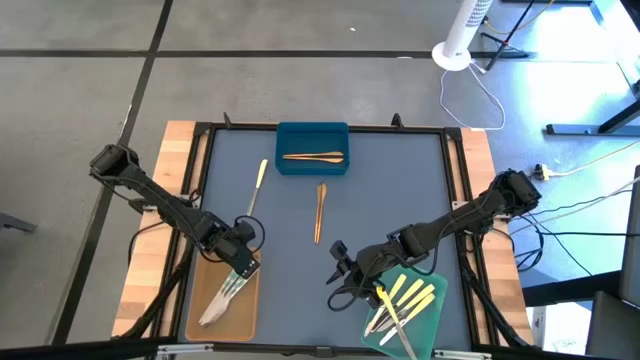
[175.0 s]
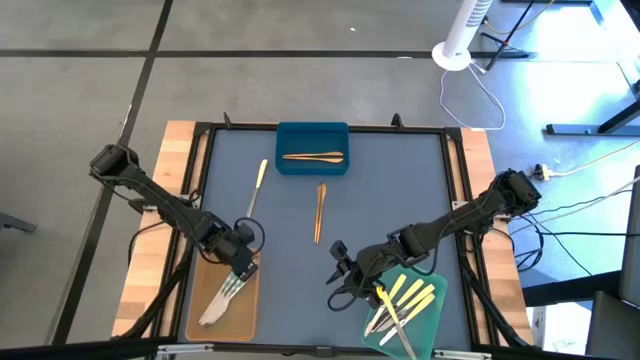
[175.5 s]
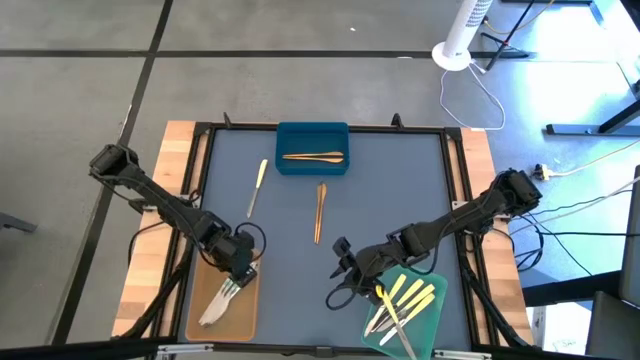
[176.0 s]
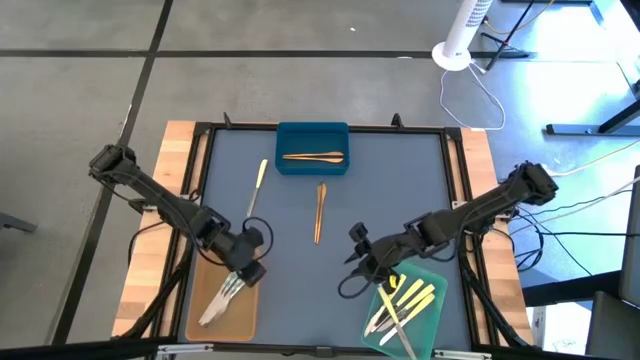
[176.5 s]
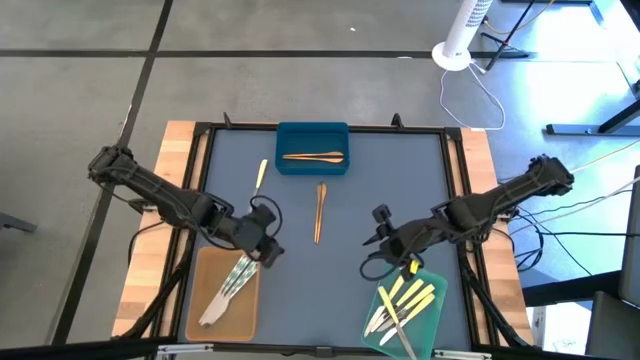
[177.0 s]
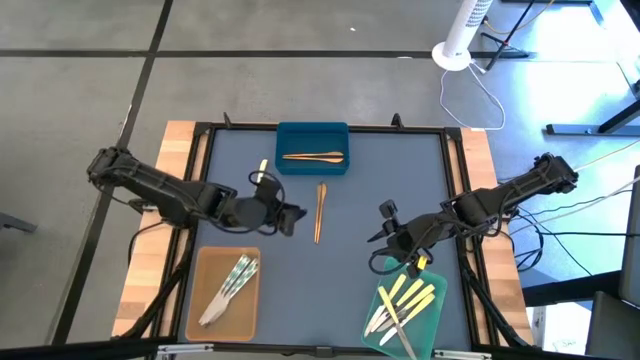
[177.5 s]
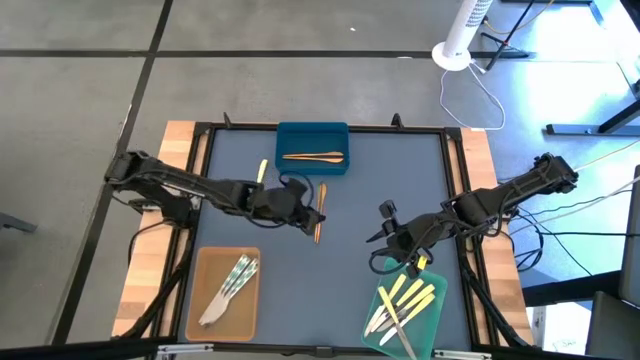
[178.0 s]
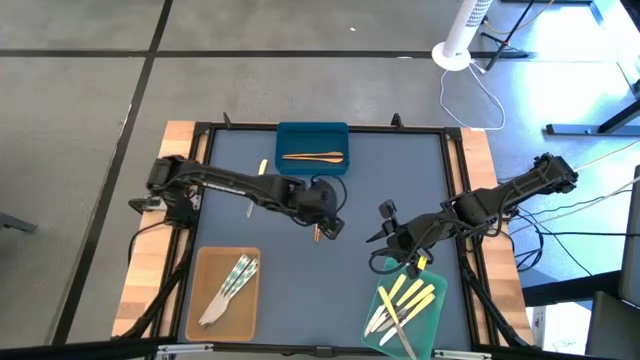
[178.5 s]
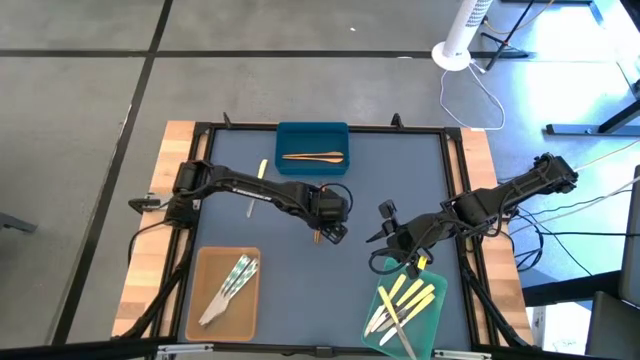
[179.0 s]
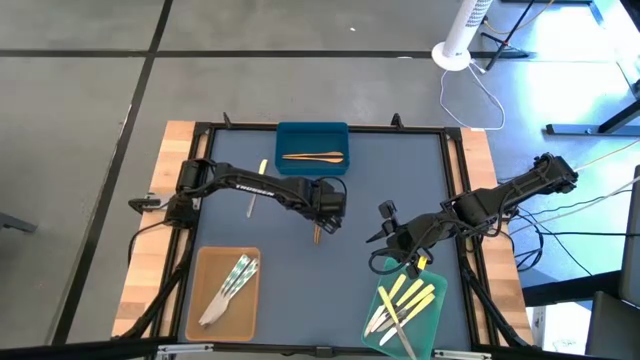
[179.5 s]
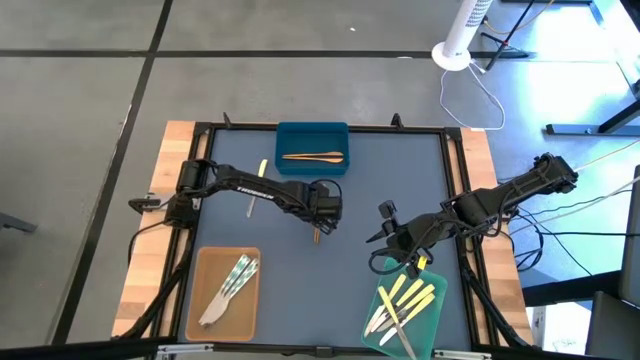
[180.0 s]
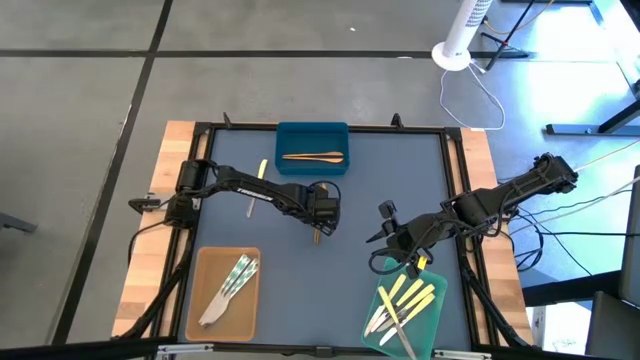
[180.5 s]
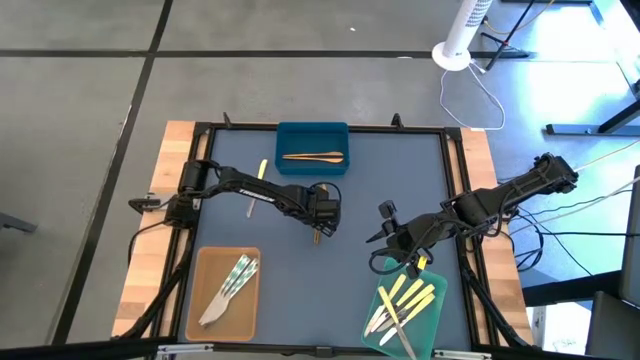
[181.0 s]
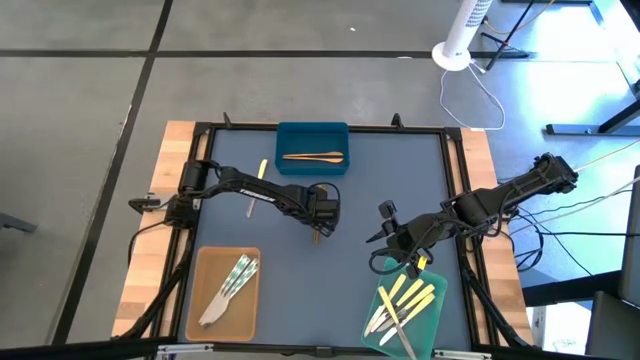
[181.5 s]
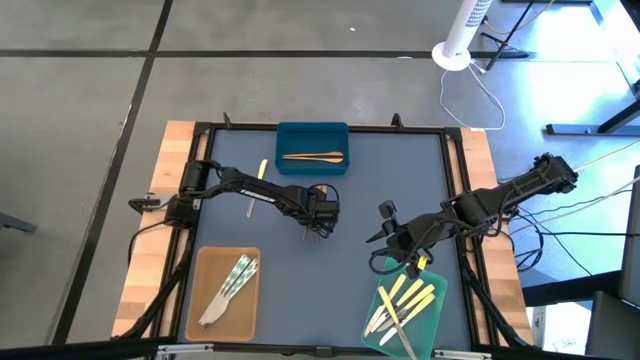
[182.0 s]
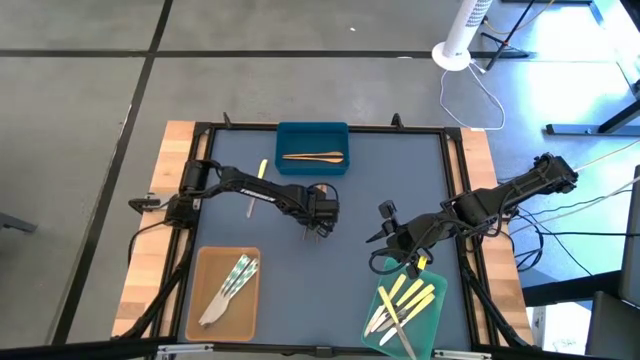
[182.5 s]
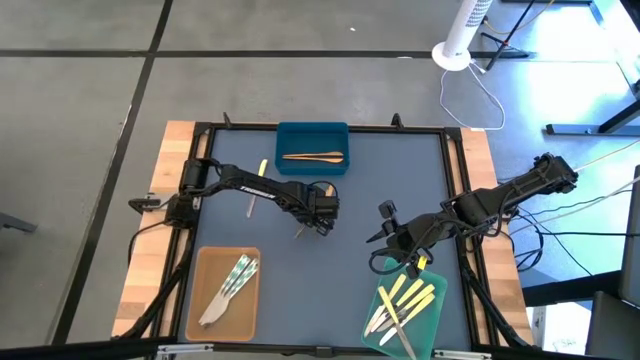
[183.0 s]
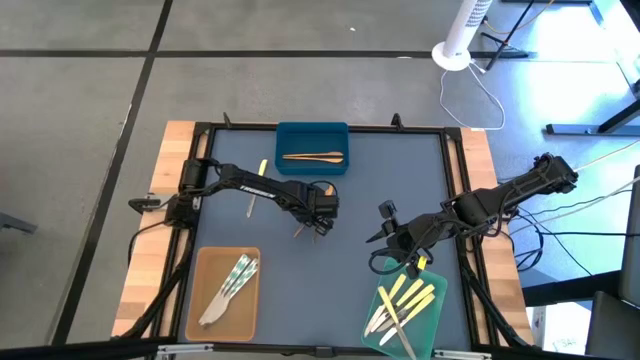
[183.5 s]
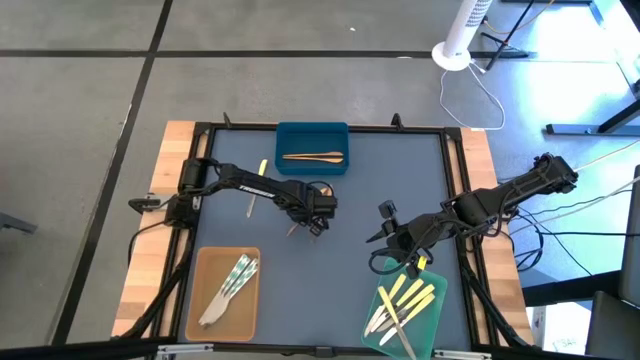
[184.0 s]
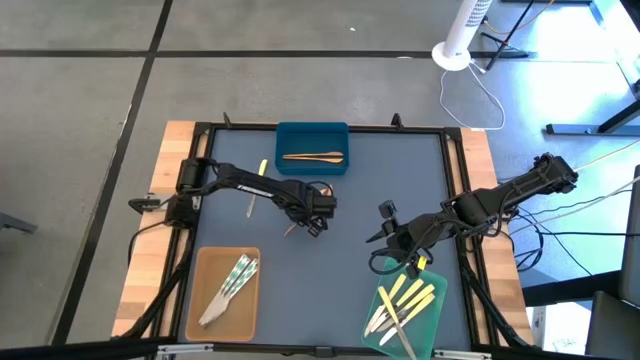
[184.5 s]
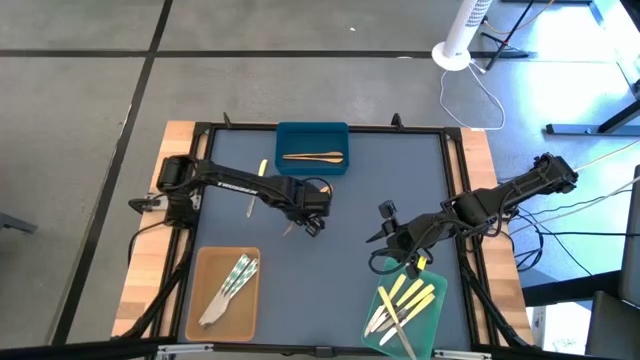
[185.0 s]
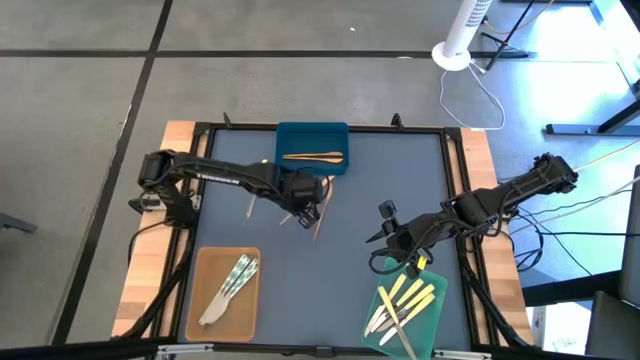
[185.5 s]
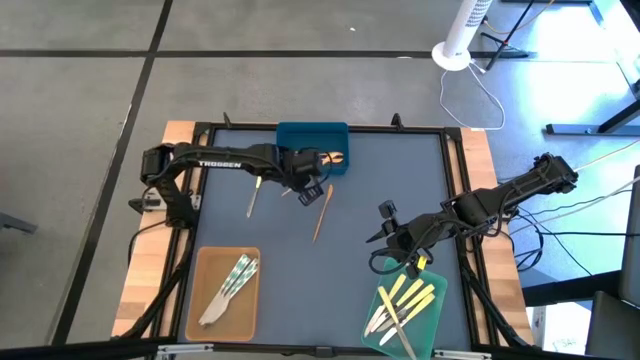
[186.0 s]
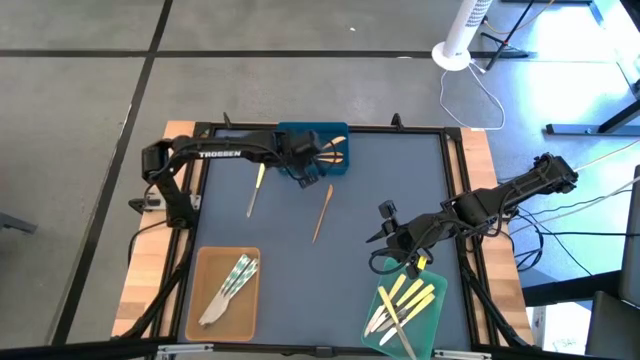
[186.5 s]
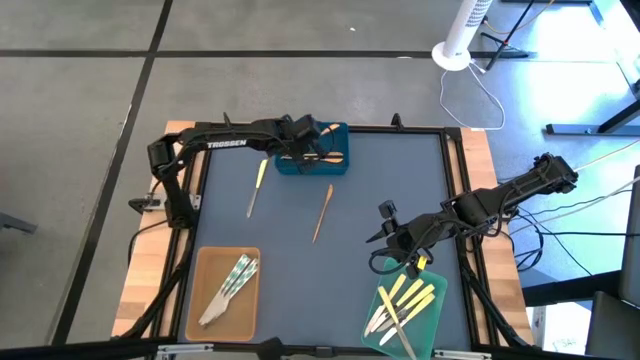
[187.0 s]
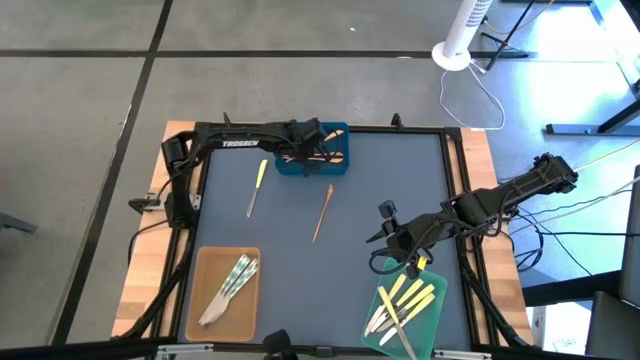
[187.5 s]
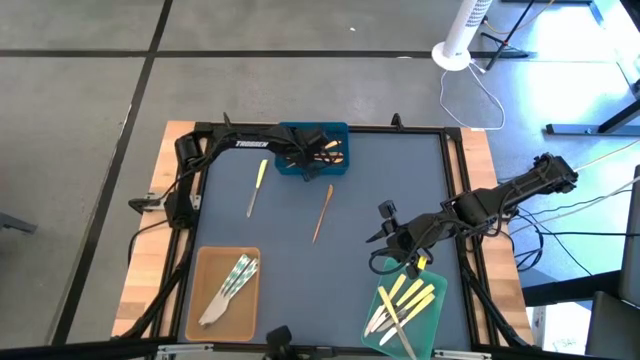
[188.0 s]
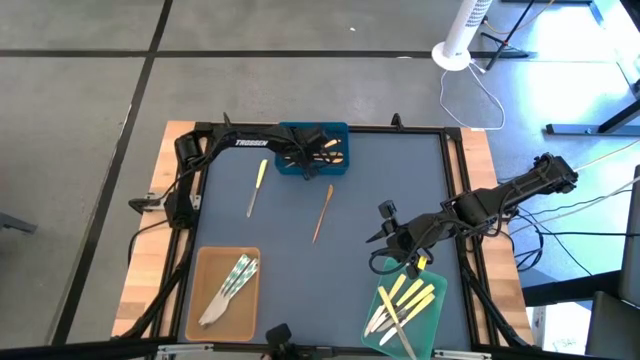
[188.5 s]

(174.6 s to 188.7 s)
Task: Sort silverware by color (type)
Put the gold knife into the blue bin

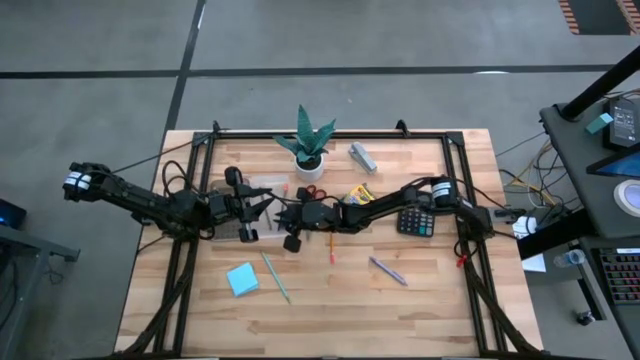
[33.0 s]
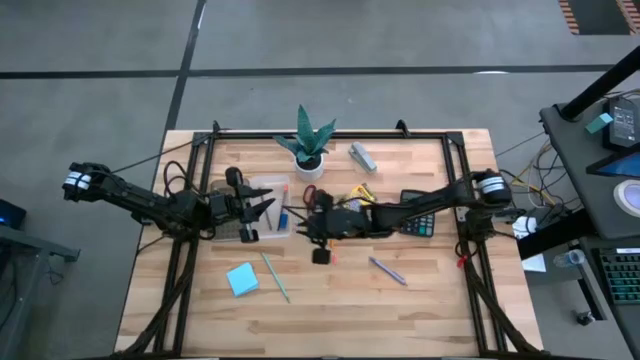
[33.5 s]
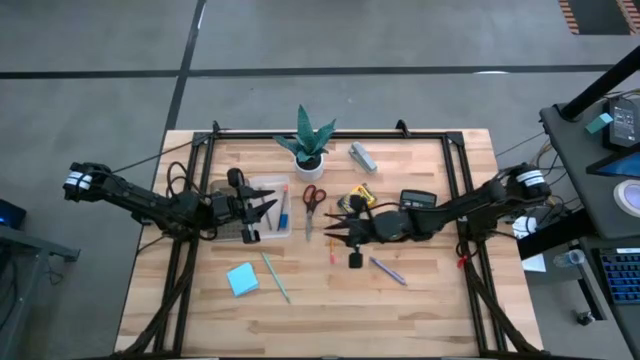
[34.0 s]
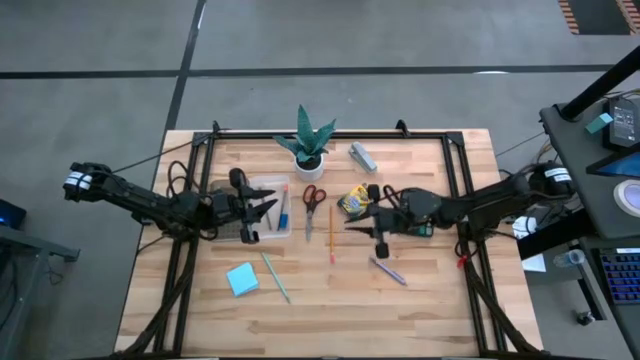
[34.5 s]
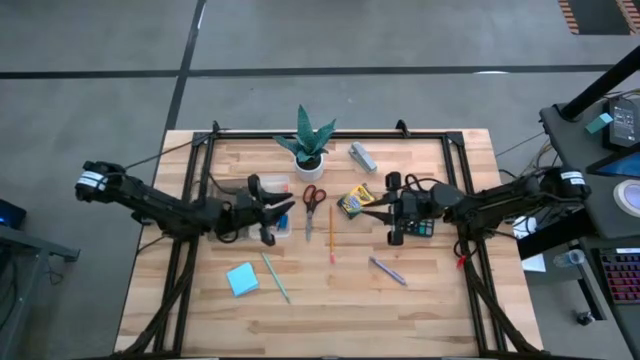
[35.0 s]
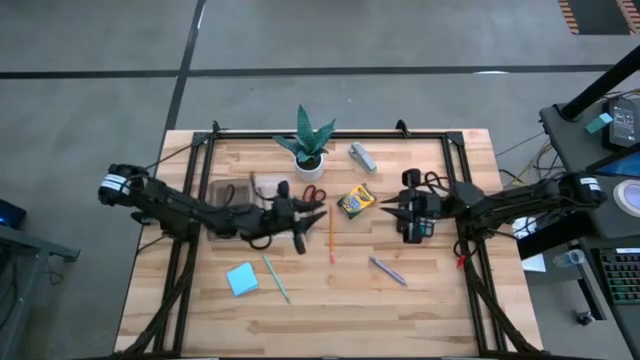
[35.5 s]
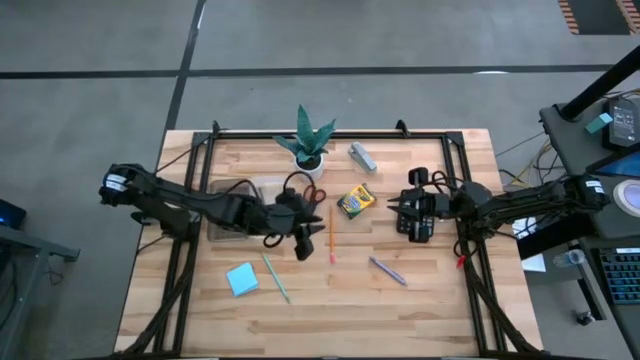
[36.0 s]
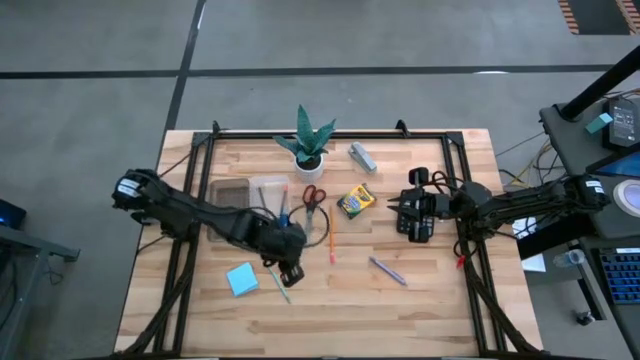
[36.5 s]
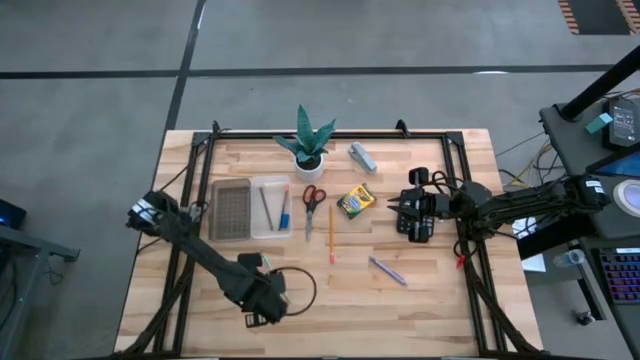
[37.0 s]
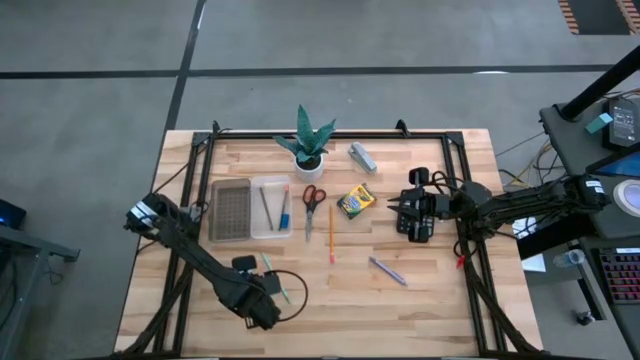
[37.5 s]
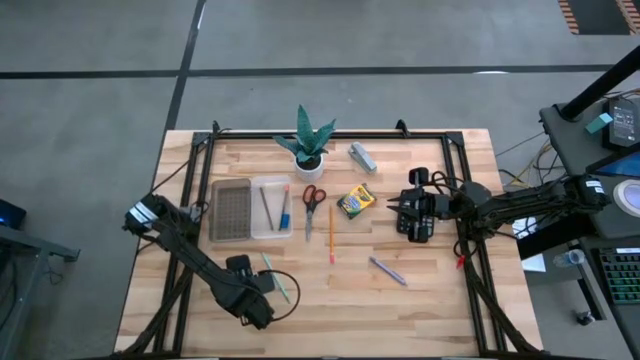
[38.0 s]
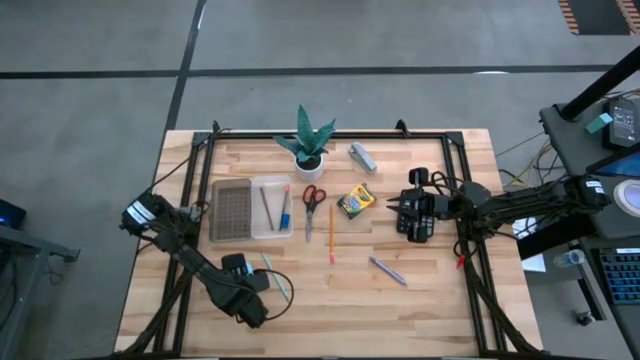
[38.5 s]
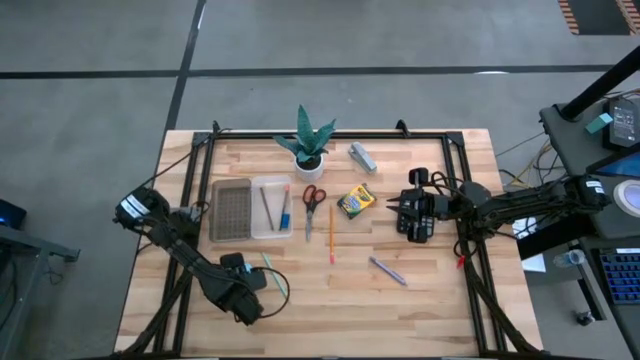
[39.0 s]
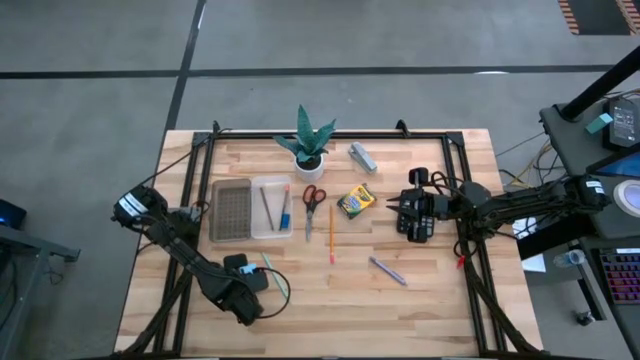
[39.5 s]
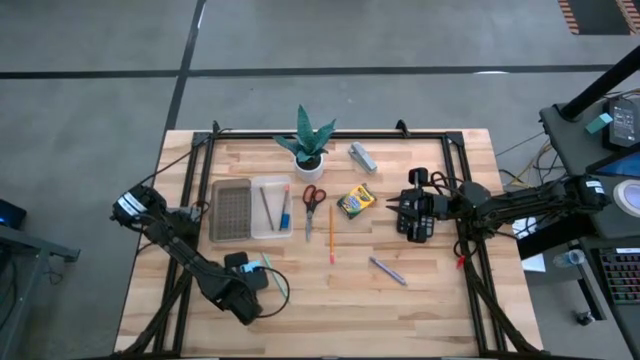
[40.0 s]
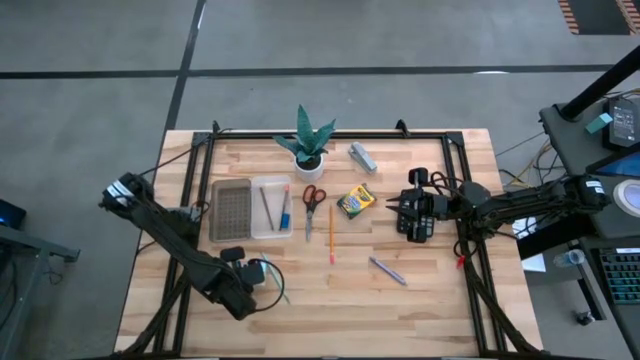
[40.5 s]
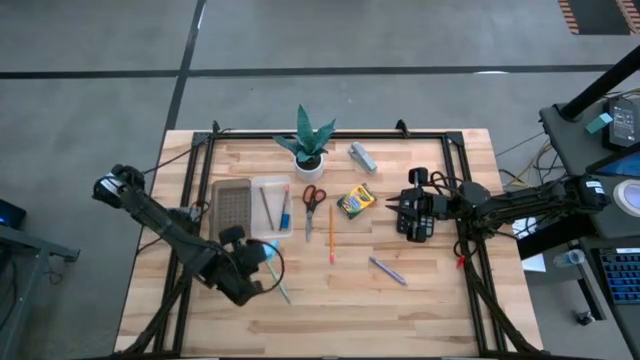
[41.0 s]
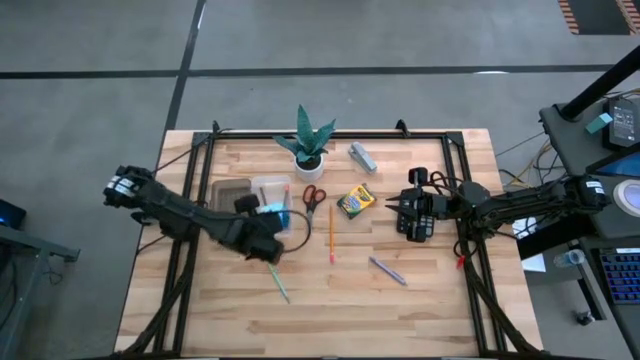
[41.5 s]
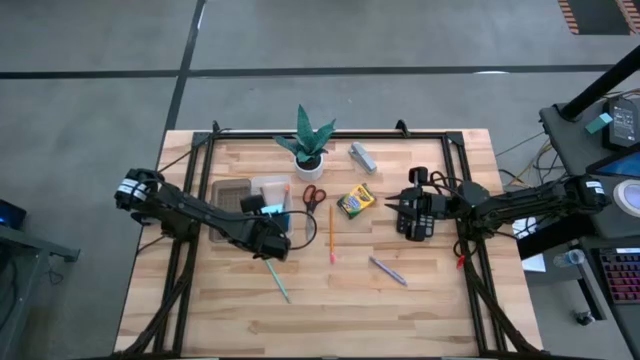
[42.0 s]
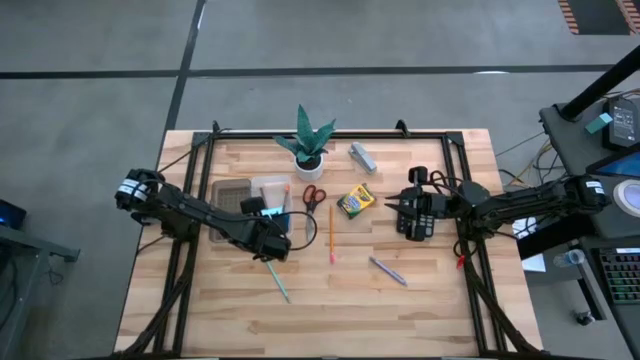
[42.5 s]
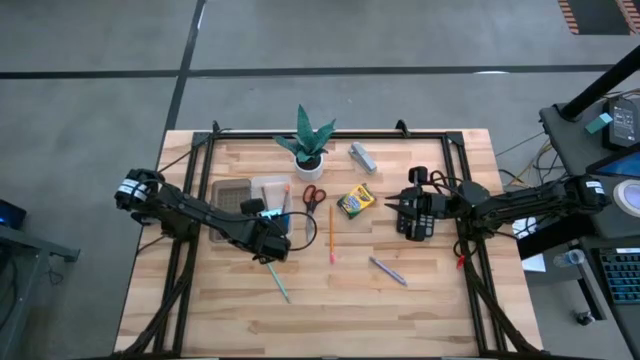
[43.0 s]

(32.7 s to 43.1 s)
Task: Pack school essentials
Put the light blue sticky notes into the white and black box
